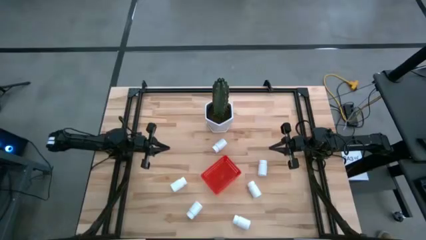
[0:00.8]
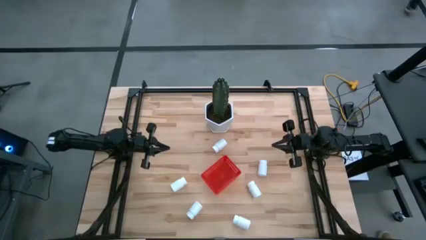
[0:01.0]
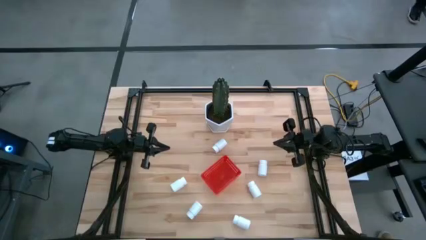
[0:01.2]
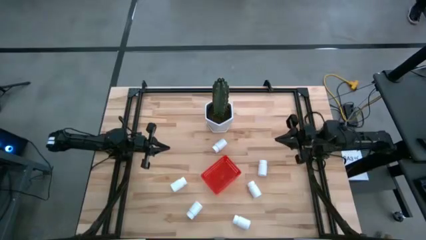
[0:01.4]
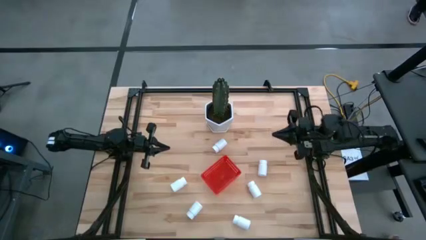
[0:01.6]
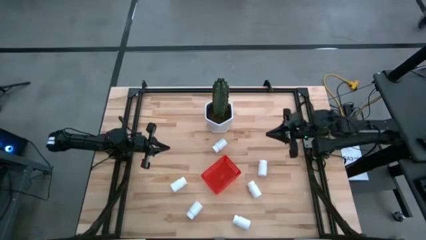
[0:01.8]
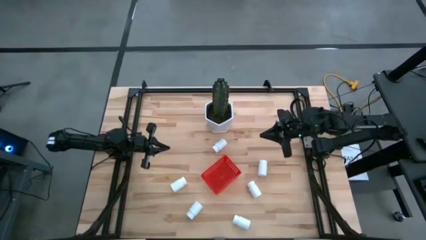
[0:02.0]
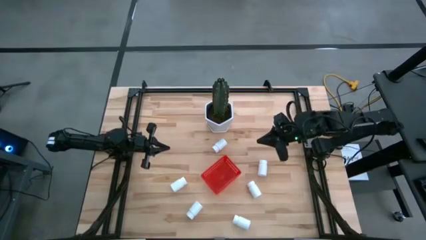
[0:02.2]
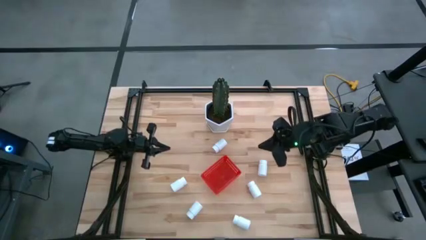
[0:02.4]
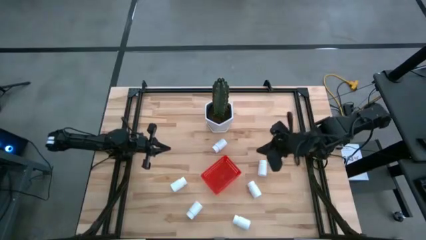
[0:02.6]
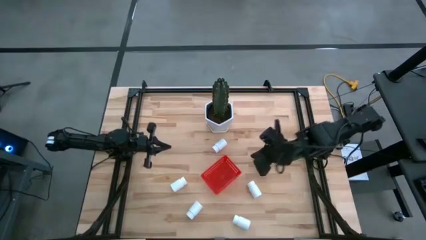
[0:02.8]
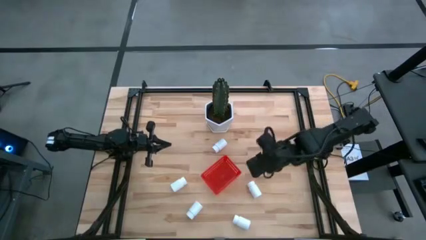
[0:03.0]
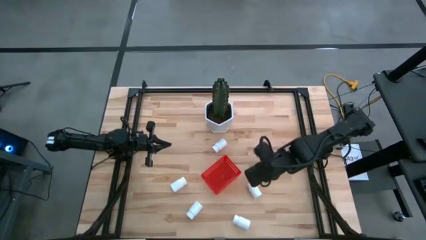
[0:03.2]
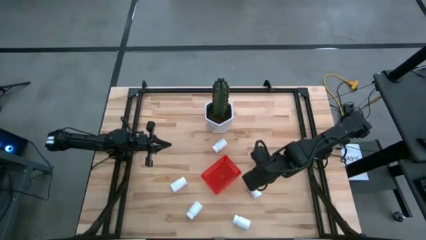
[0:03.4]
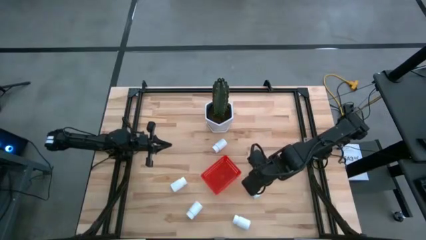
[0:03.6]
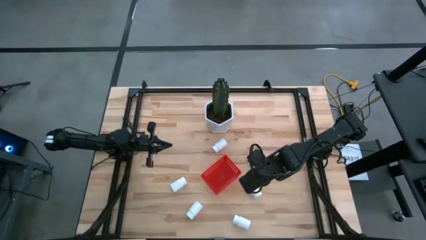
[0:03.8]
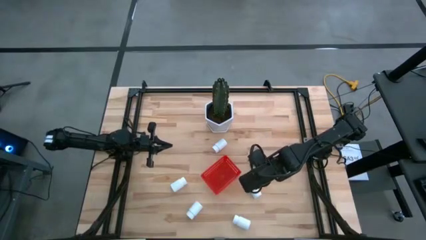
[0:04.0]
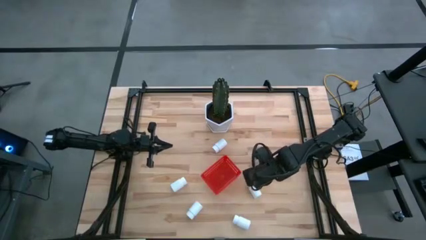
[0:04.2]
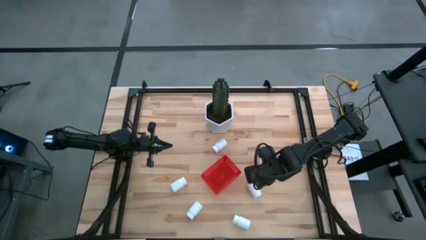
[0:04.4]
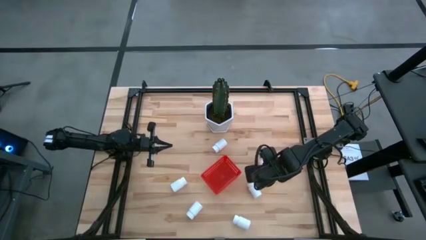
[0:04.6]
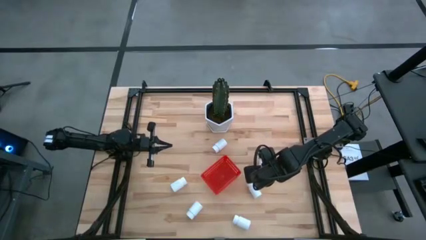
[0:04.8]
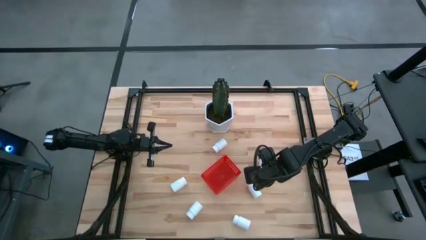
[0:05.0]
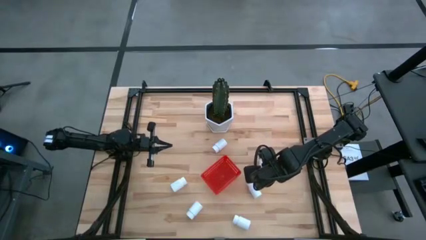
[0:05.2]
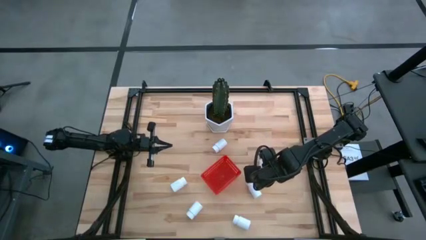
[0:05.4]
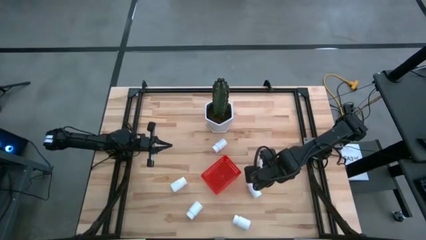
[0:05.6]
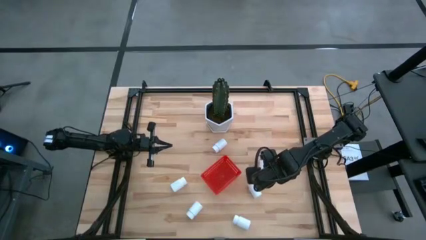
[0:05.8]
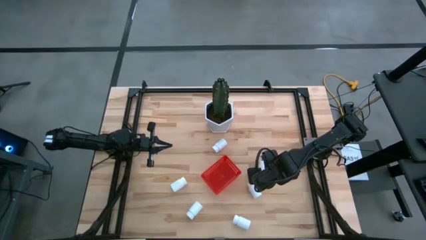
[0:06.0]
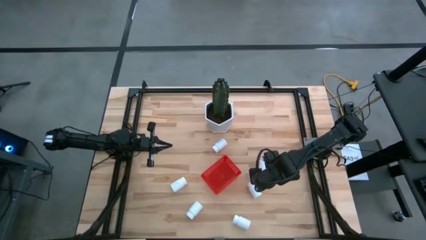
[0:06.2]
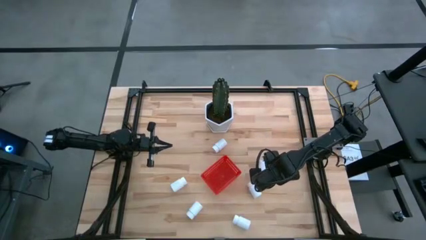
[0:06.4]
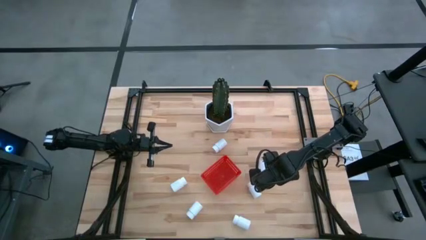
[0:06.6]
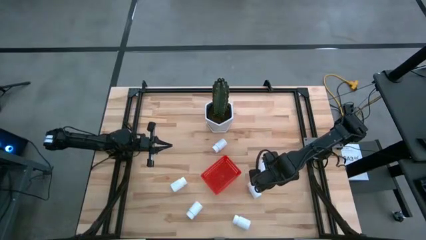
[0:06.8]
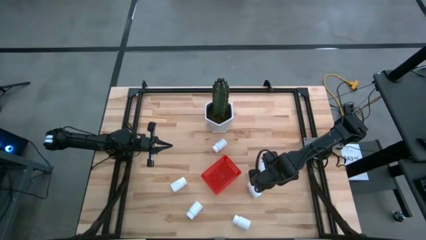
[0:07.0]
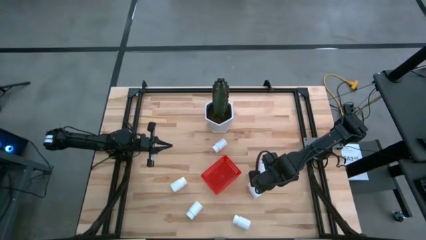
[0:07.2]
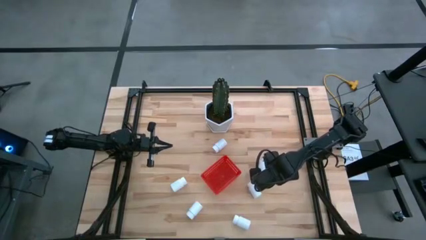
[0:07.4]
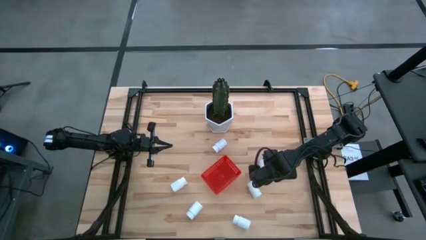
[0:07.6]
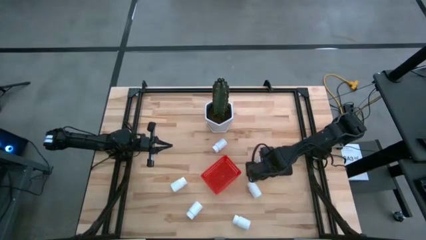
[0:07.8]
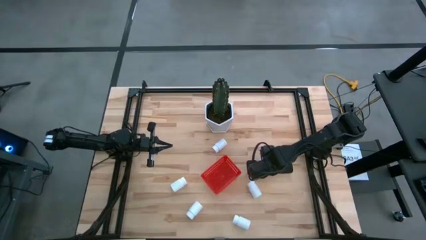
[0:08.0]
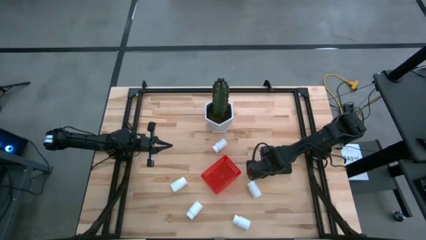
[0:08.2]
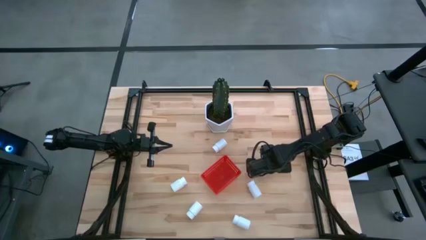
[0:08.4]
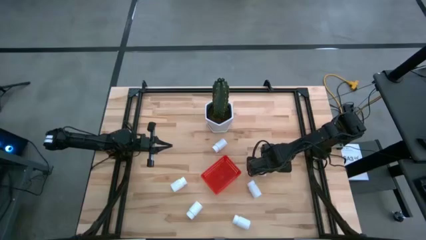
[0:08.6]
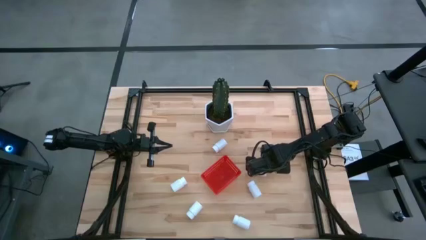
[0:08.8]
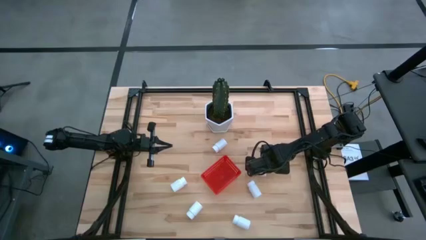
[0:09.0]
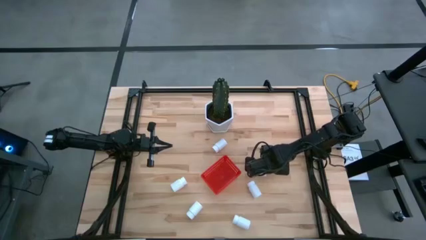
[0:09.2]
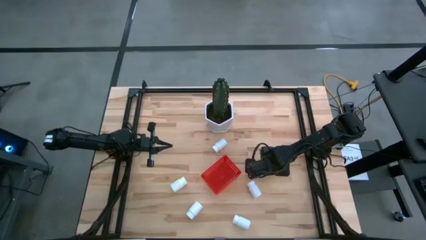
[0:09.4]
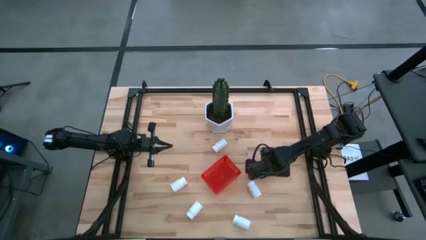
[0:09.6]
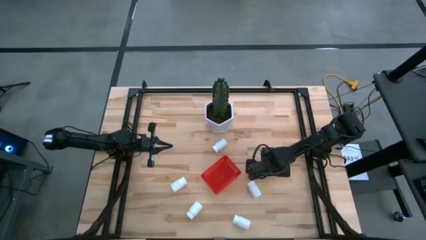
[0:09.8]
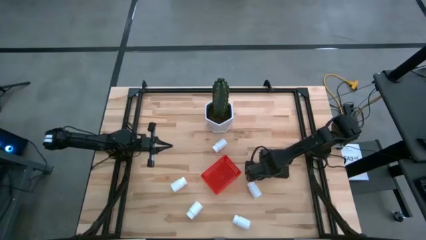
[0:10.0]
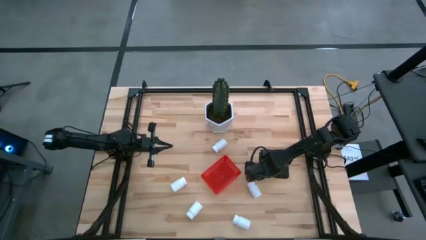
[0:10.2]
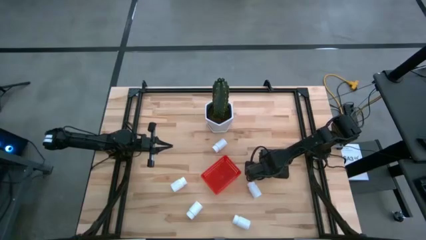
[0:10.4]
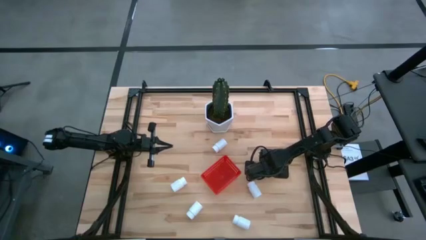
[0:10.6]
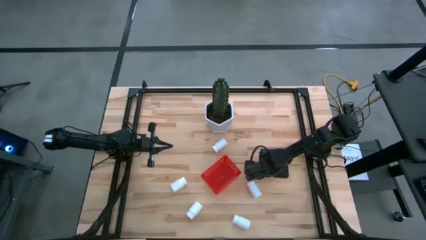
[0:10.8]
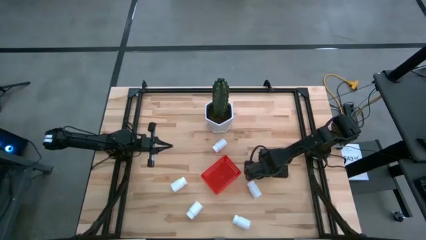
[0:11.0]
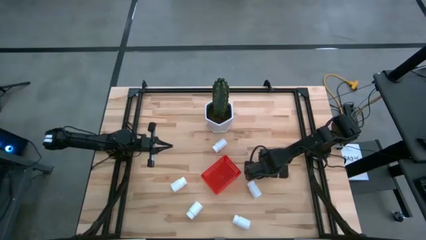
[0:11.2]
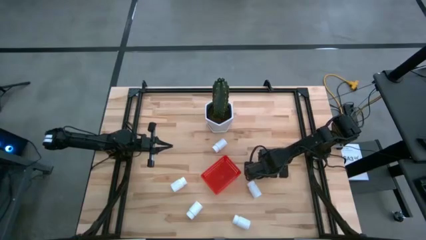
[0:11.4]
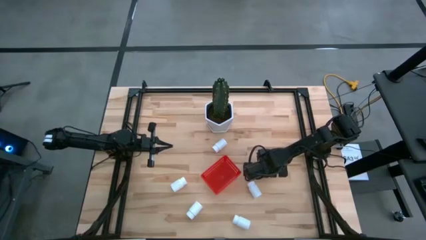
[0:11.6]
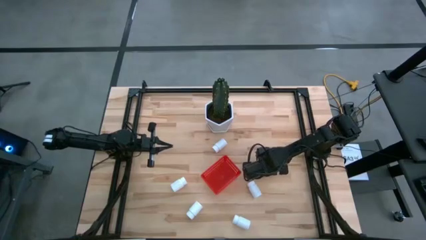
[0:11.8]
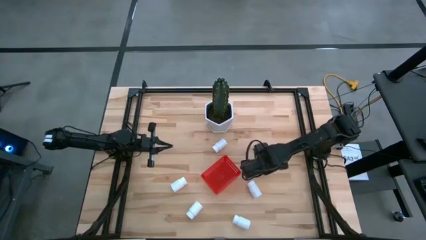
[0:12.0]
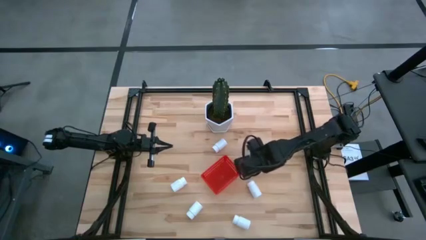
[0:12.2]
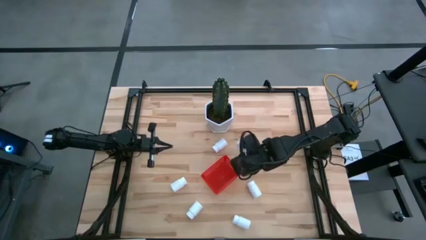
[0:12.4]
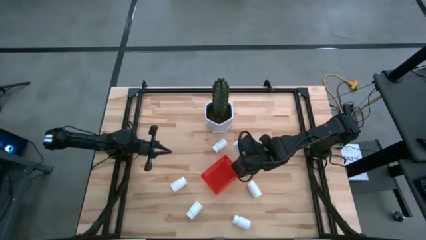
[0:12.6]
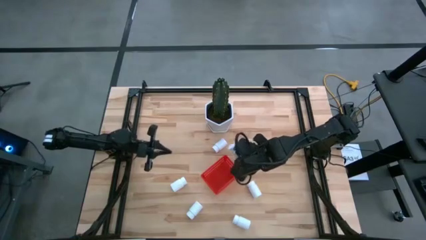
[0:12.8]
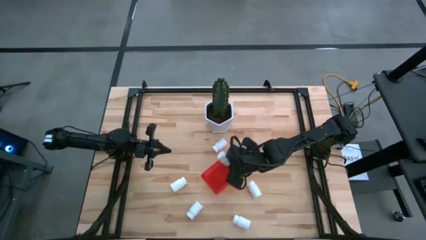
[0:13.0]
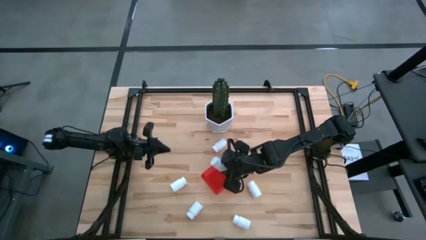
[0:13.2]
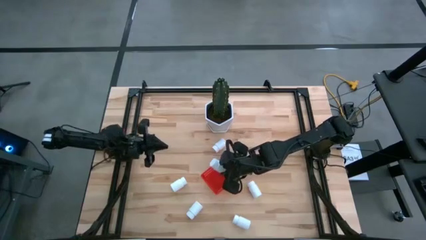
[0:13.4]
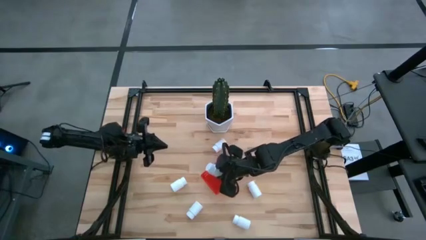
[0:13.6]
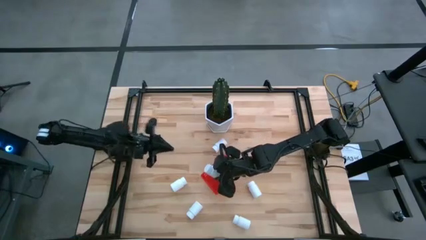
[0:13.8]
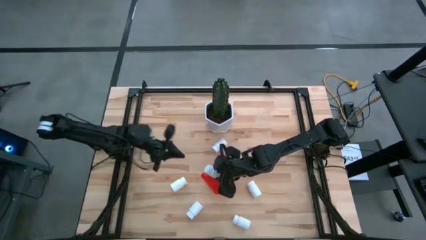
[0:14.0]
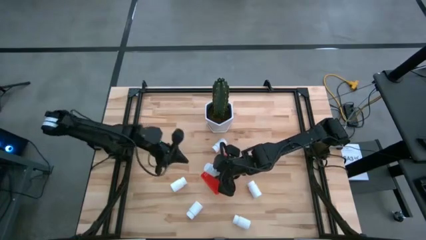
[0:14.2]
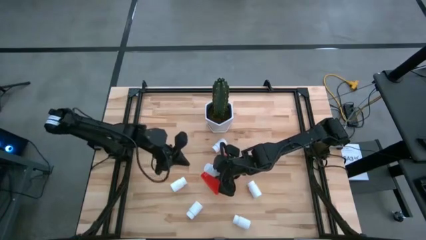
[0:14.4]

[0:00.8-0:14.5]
Task: Pick and place pill bottles into a basket
Put the white pill bottle into the red bin
